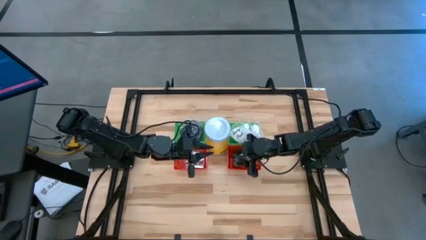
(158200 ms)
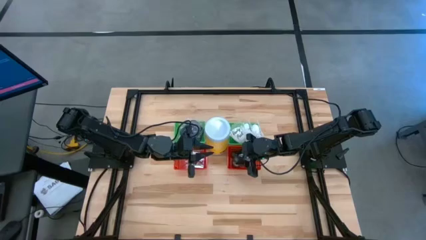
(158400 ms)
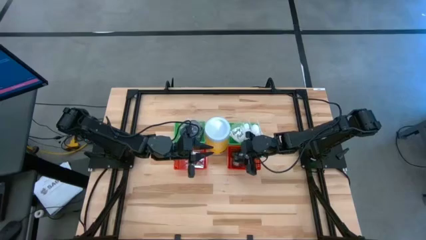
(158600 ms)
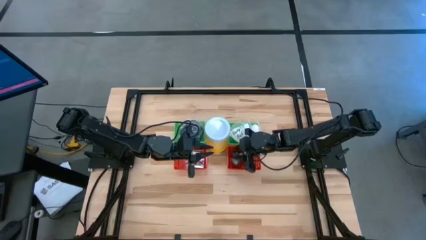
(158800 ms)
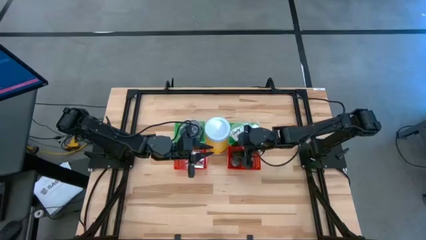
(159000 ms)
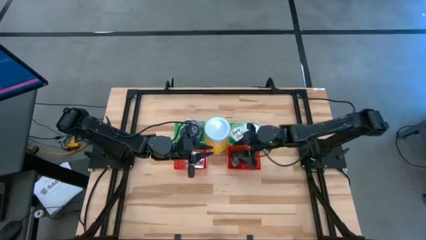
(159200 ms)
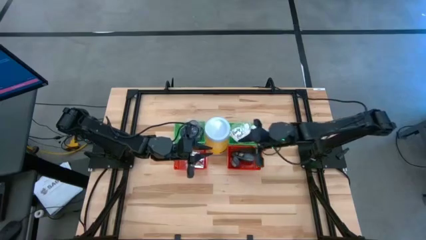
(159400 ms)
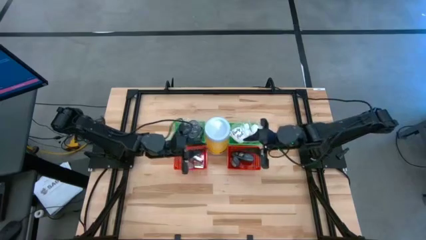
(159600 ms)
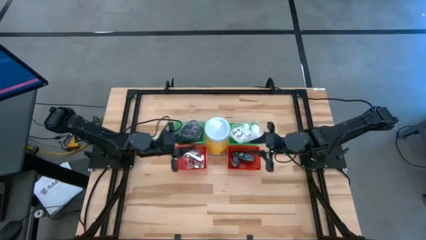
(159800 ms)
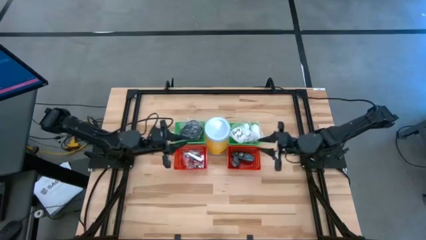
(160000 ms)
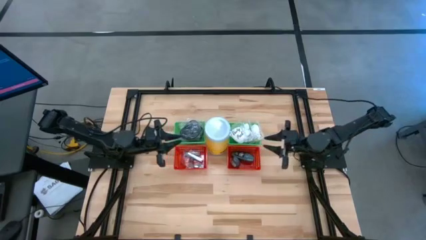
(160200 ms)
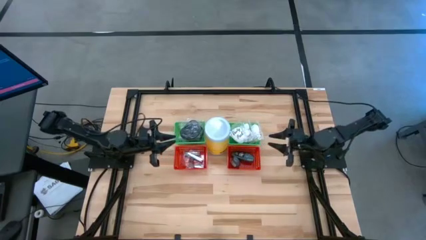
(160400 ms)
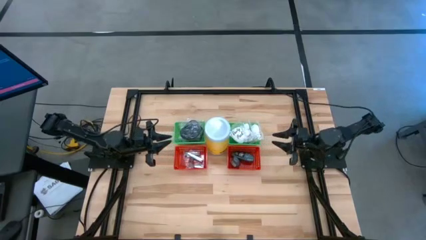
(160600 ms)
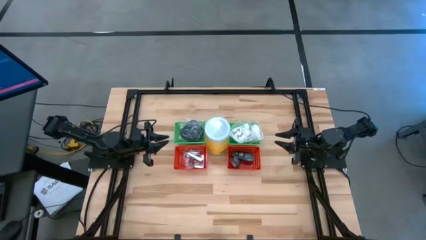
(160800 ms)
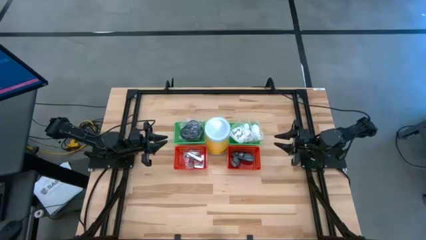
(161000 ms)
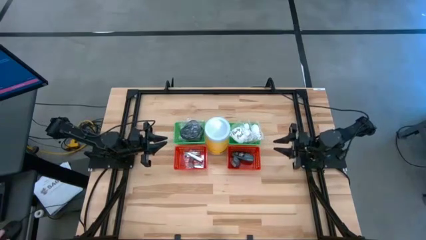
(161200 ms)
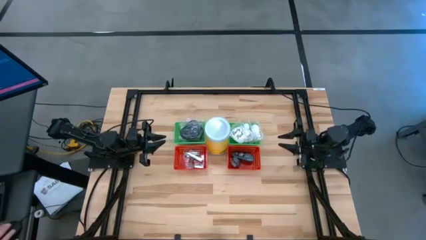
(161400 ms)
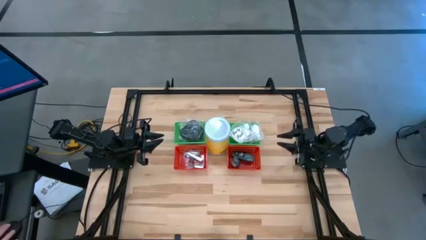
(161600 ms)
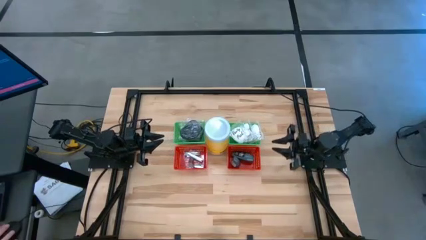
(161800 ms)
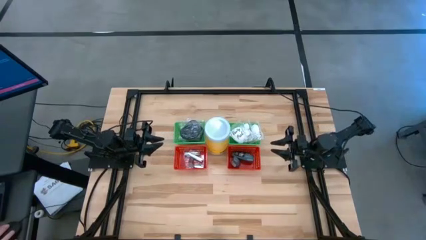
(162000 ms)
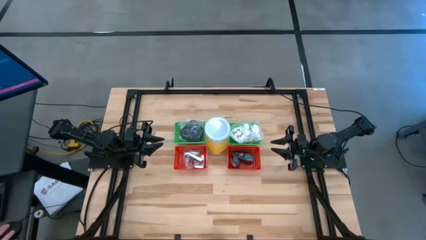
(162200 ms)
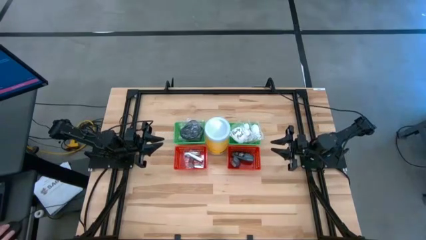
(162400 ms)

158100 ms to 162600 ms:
Task: Pick & Place Travel size toiletries
Return to Home Position

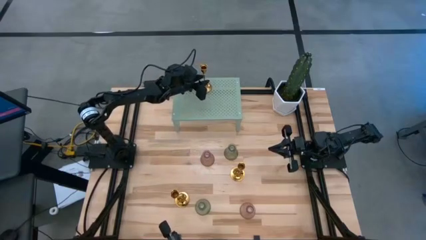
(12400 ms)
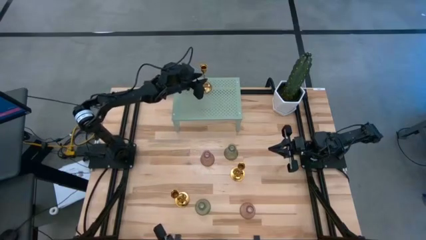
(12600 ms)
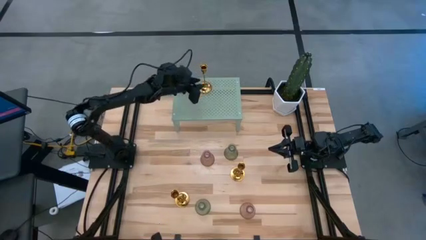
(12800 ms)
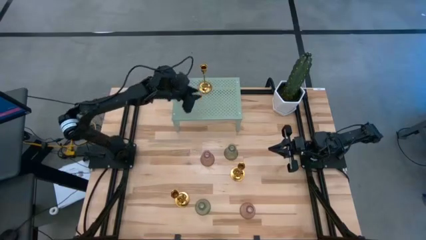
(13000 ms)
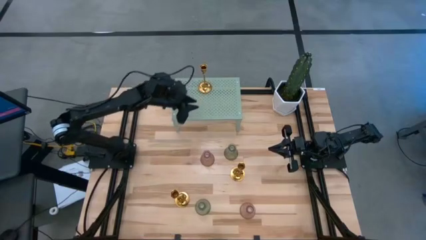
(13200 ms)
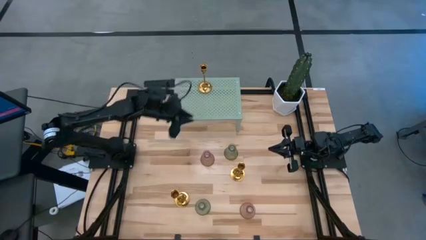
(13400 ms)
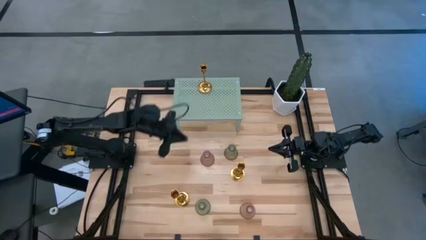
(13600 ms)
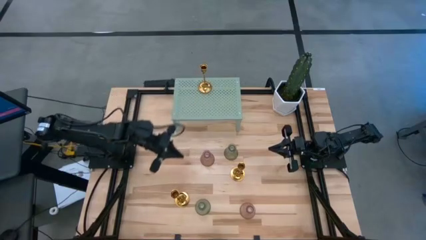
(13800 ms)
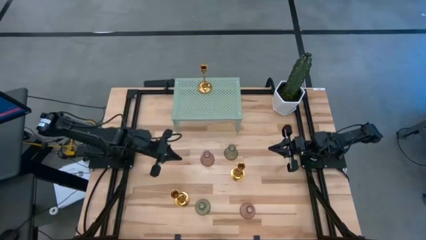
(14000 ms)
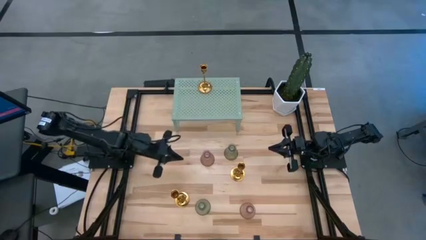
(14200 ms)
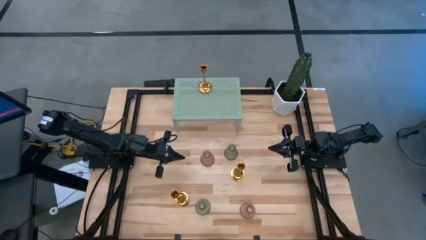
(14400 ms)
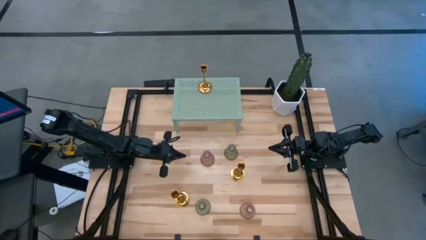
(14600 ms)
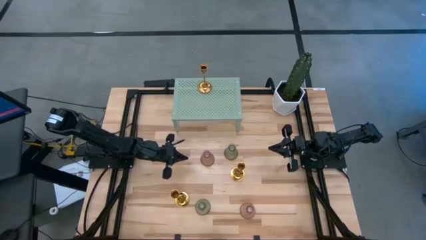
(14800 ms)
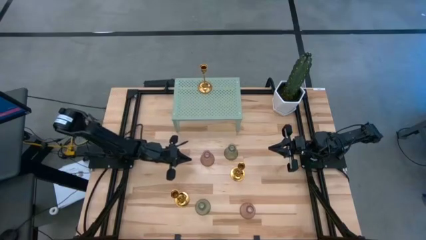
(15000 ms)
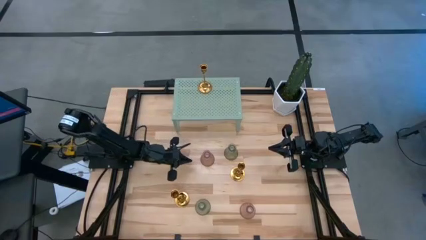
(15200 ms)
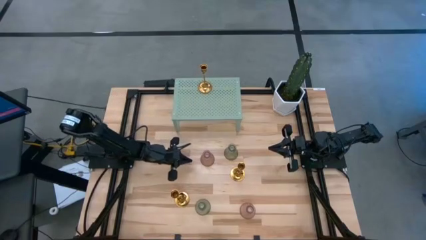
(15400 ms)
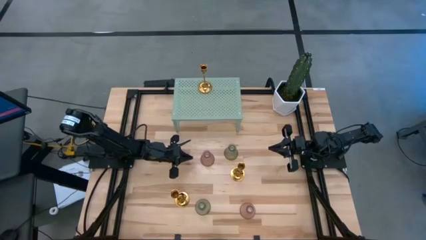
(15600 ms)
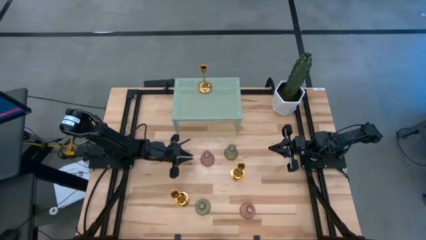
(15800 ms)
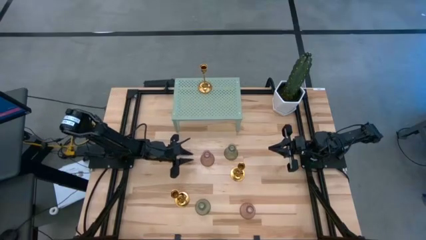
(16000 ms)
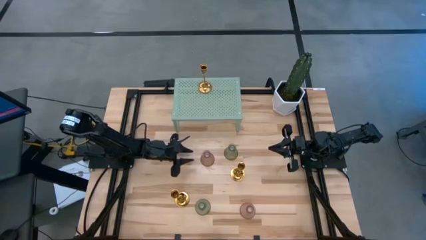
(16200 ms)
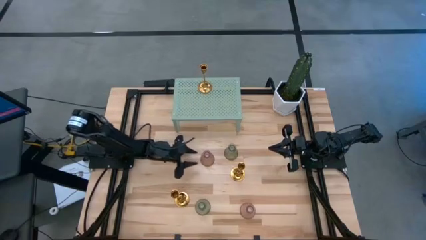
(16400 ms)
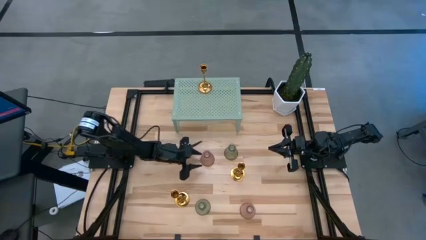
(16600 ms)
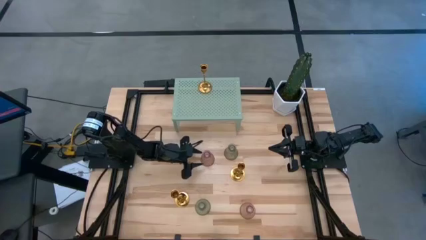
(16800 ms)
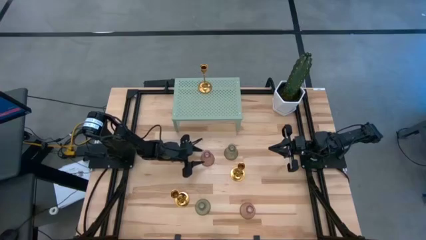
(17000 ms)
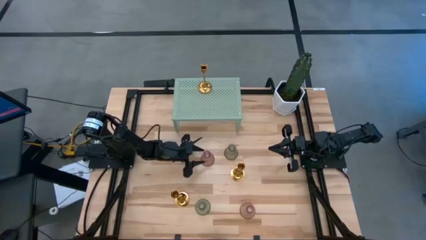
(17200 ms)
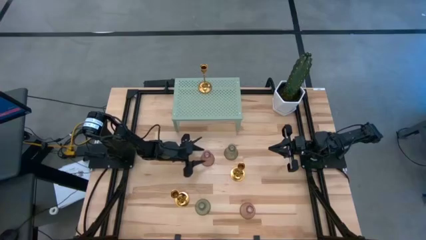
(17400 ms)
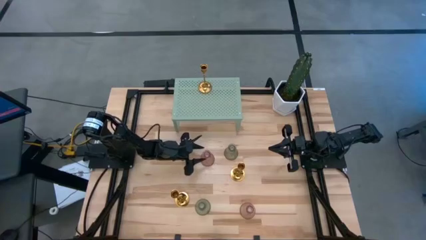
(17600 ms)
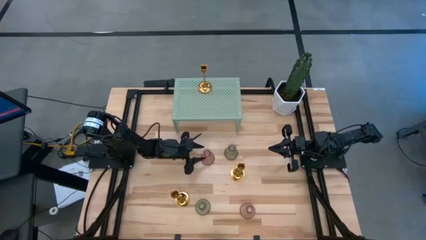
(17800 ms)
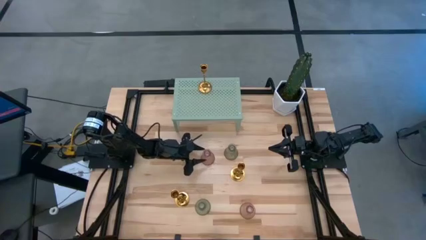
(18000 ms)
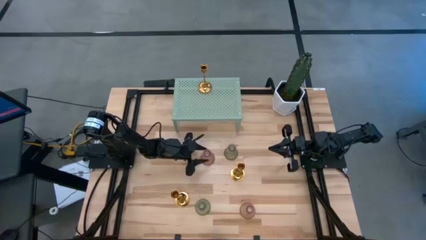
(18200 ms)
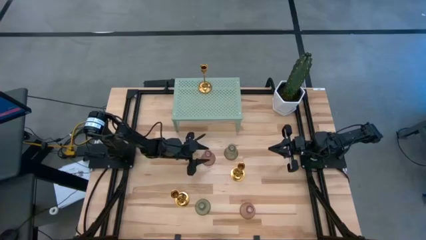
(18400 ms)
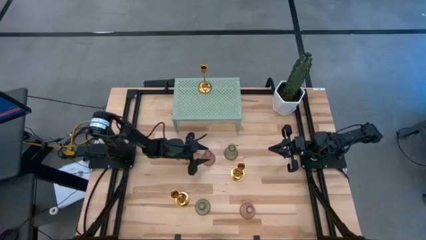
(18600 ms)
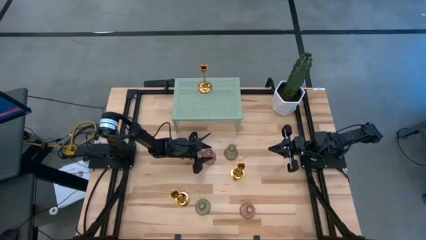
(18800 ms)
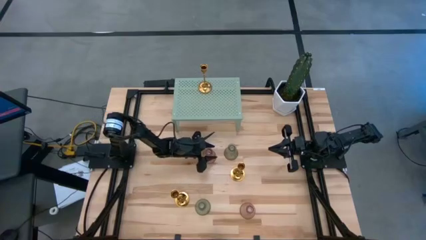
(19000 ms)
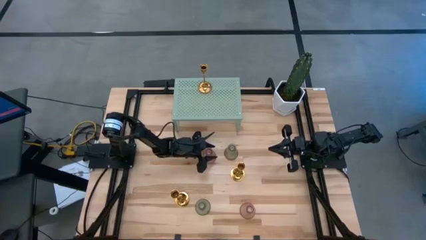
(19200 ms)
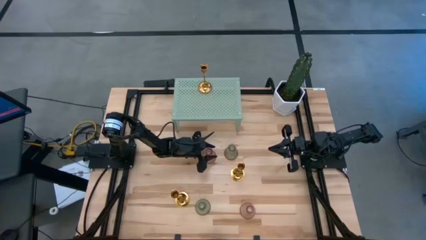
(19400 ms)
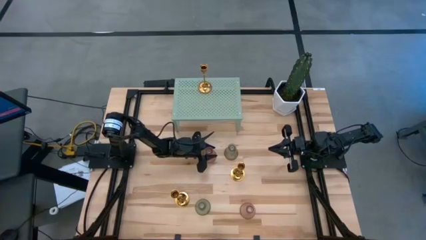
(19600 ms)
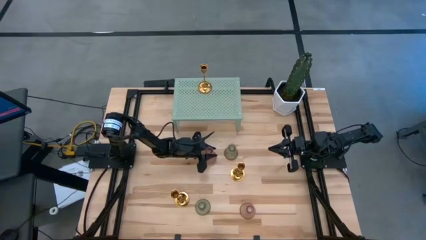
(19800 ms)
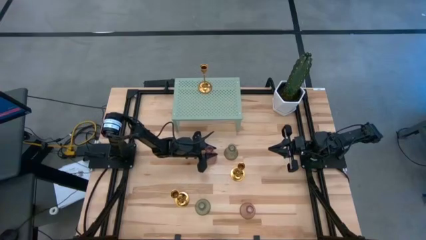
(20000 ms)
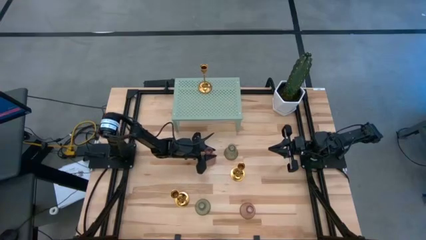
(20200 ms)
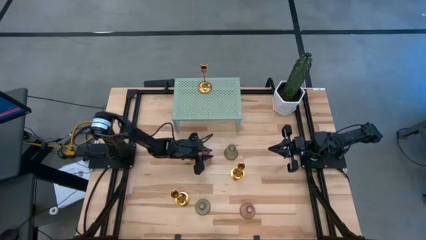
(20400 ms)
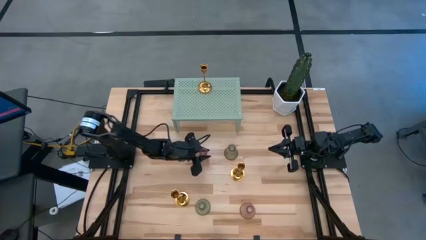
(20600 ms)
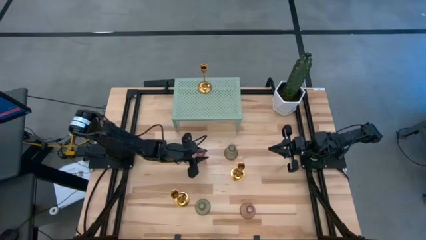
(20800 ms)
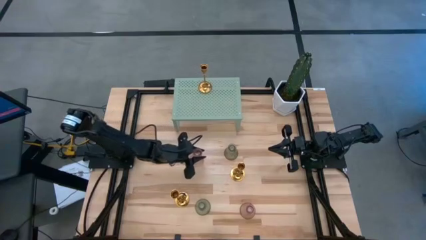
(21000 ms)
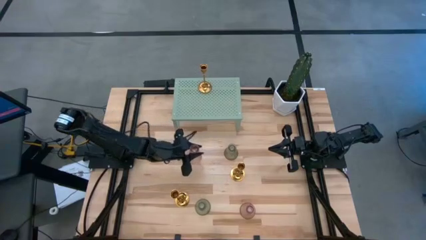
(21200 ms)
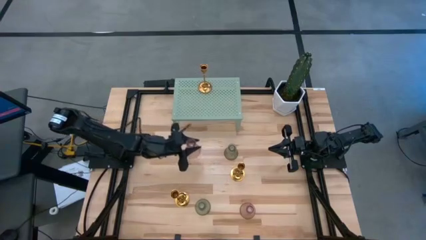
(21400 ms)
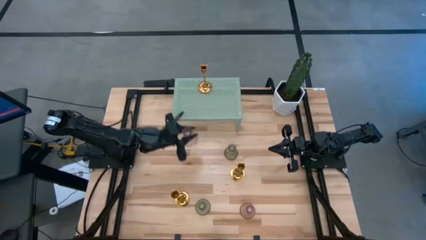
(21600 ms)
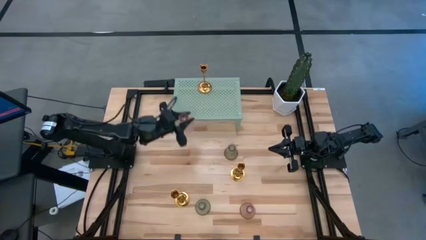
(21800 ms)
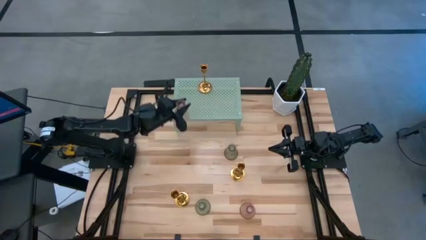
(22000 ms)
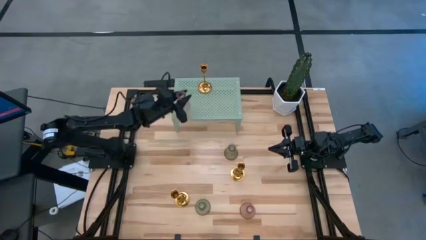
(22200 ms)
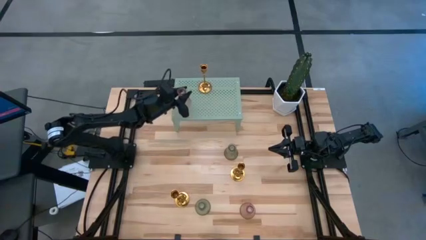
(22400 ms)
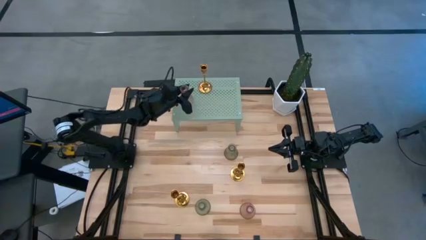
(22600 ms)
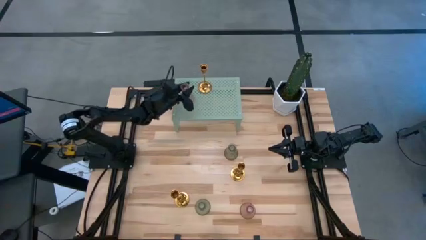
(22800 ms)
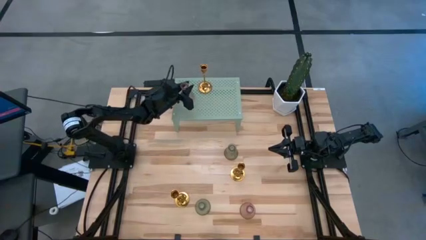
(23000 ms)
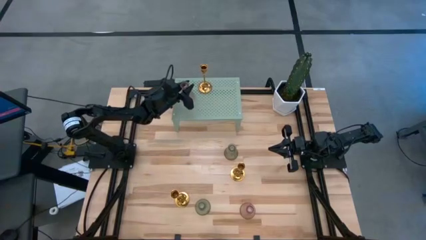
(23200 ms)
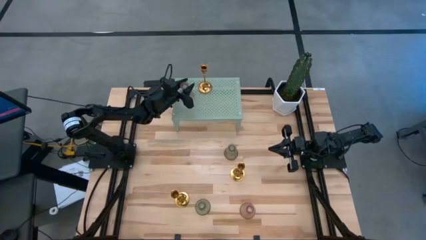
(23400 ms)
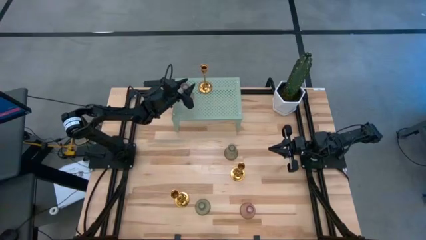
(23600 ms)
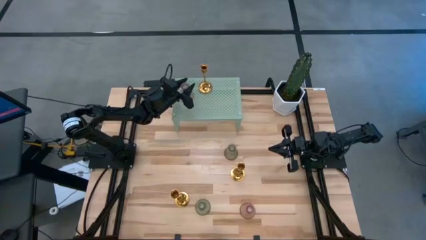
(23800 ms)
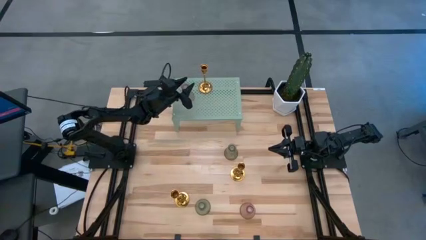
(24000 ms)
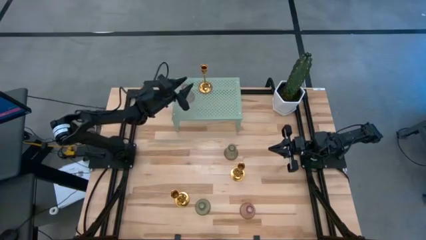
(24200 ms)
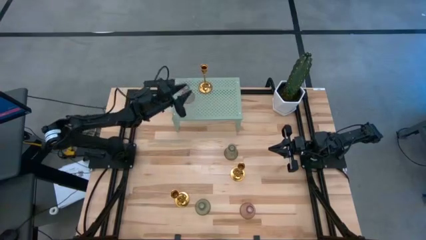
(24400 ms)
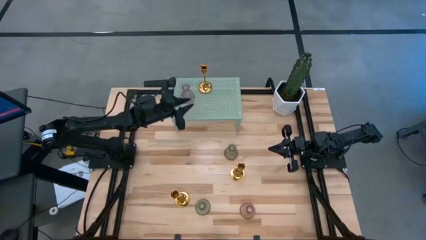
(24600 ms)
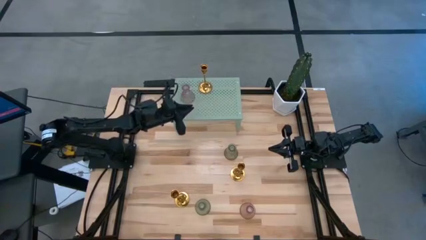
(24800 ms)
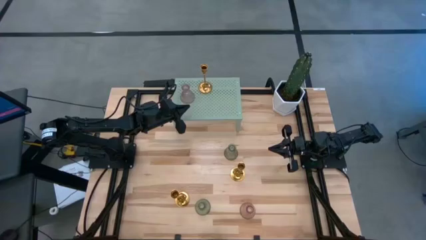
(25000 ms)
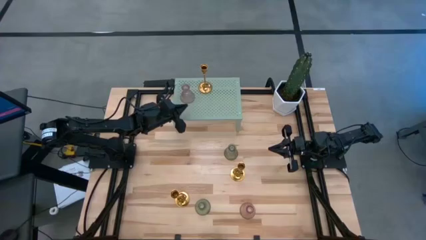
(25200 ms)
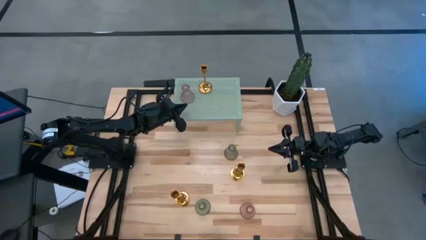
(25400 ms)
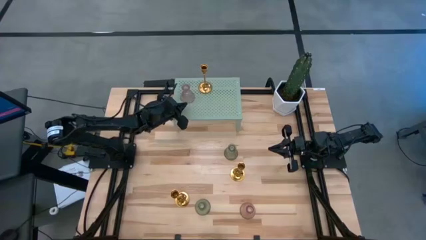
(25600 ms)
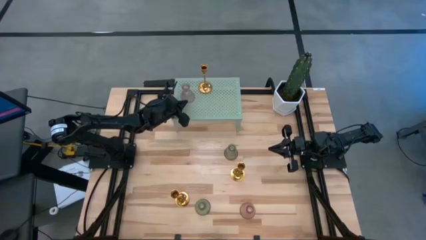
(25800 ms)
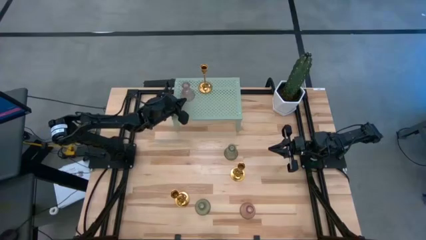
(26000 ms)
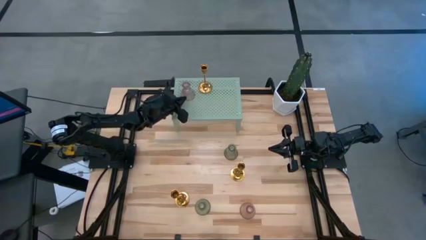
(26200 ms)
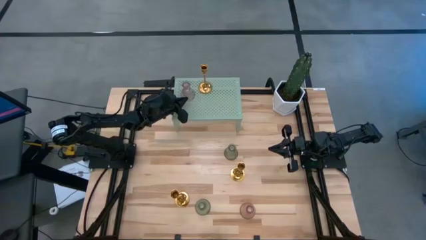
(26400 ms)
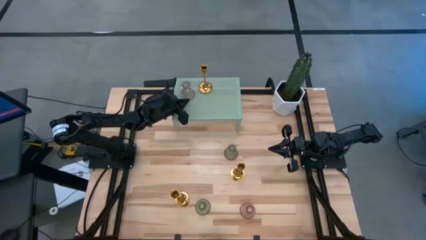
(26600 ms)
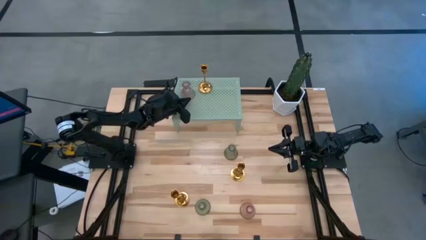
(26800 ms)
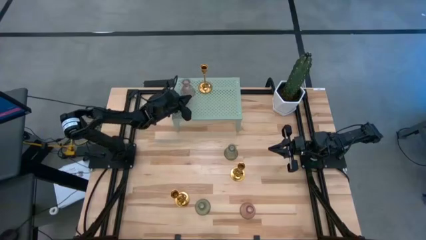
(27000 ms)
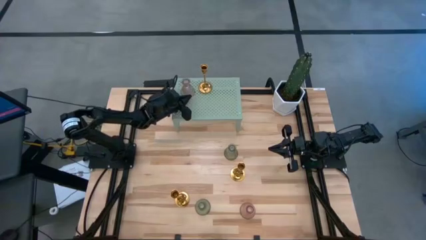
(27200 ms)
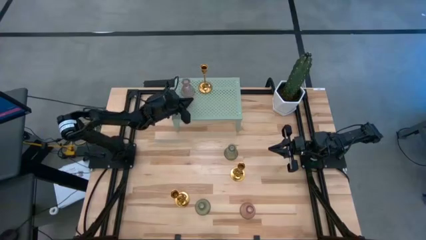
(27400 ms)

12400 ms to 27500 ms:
Task: Pick & Place candle stick holders
Put the left pink glass candle holder on the shelf
